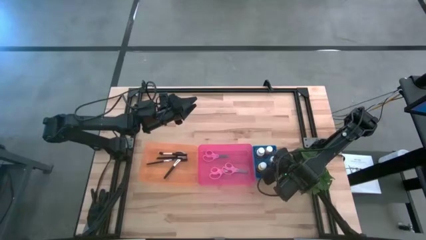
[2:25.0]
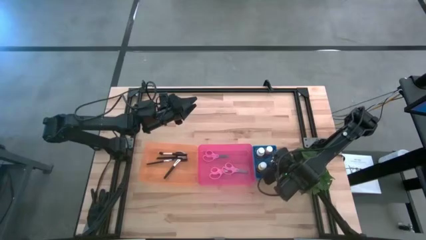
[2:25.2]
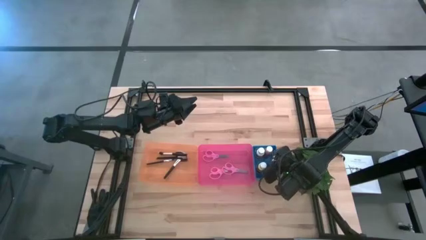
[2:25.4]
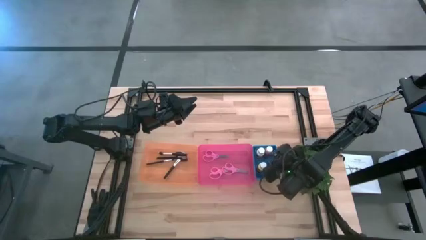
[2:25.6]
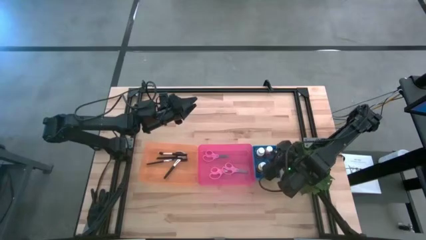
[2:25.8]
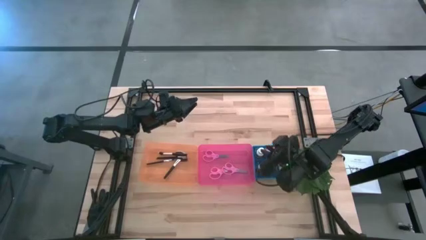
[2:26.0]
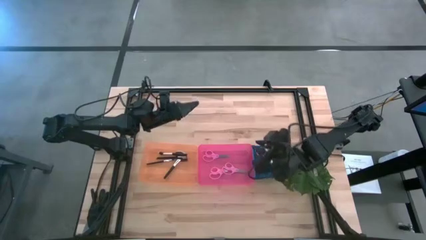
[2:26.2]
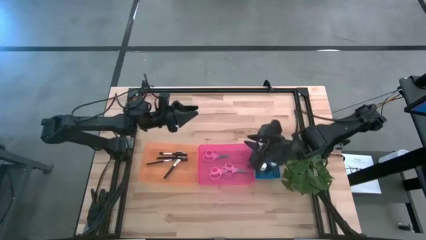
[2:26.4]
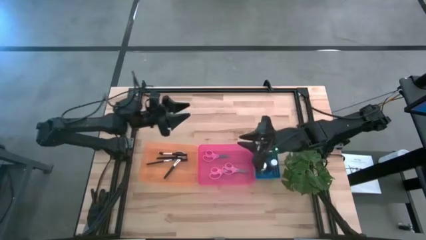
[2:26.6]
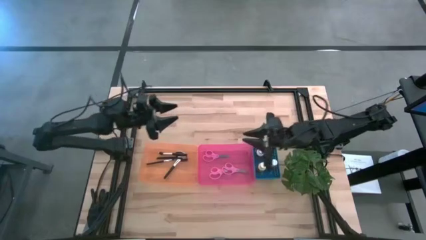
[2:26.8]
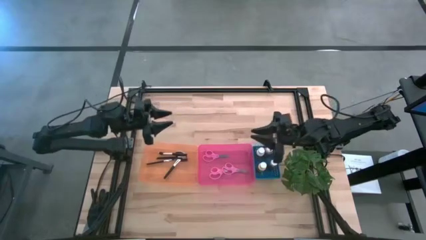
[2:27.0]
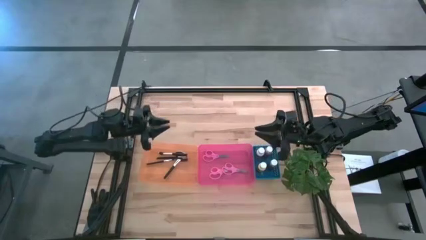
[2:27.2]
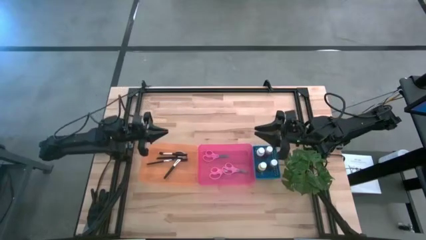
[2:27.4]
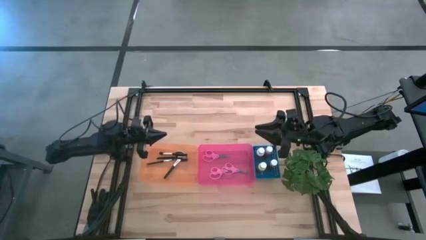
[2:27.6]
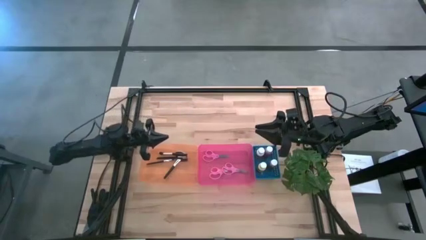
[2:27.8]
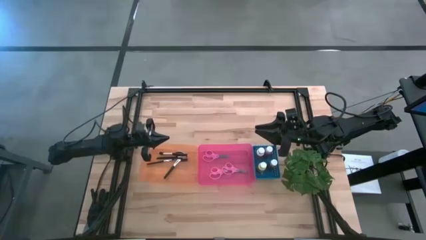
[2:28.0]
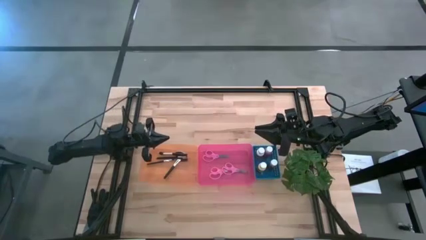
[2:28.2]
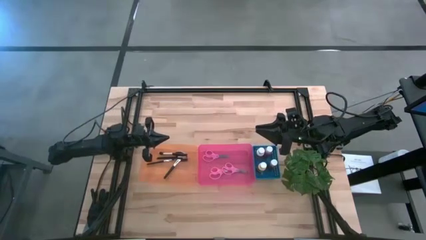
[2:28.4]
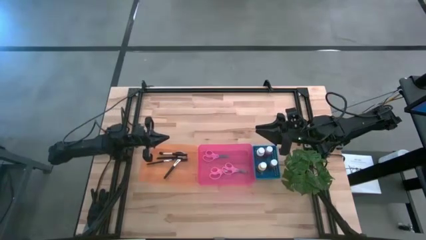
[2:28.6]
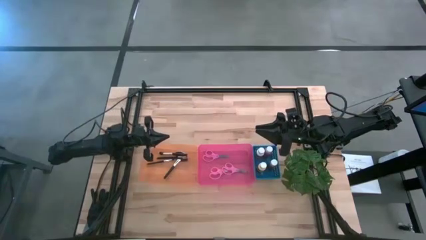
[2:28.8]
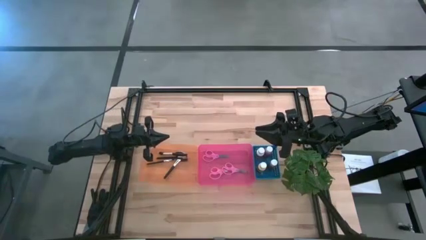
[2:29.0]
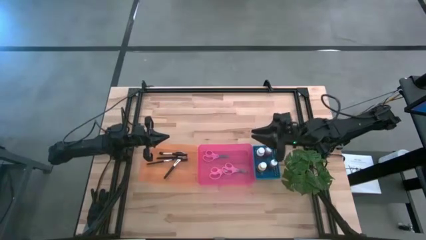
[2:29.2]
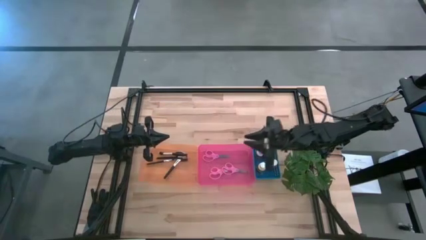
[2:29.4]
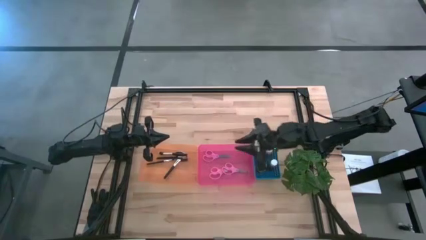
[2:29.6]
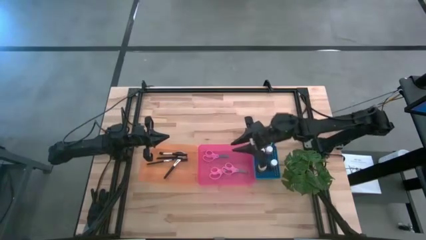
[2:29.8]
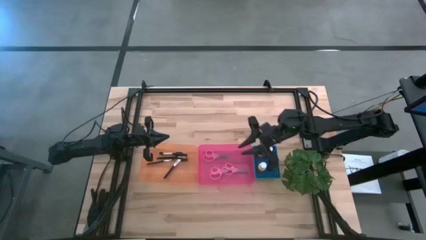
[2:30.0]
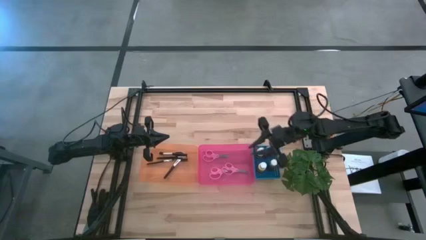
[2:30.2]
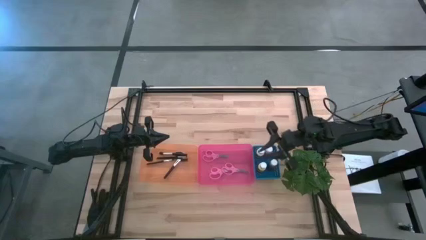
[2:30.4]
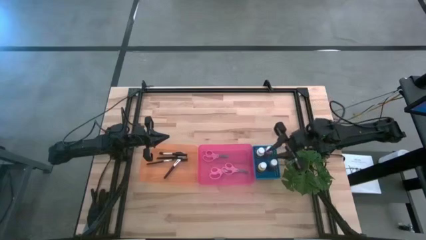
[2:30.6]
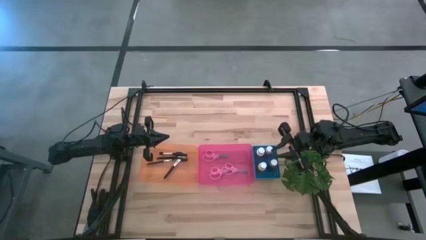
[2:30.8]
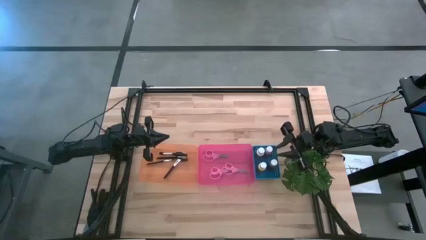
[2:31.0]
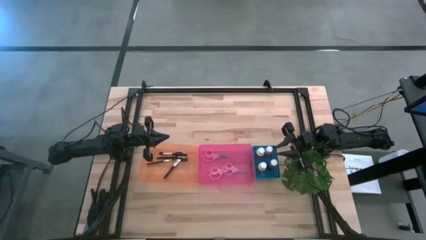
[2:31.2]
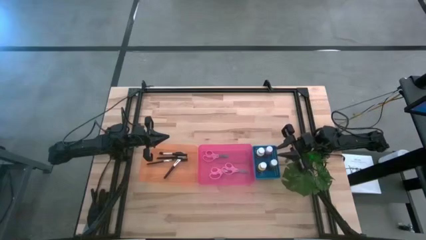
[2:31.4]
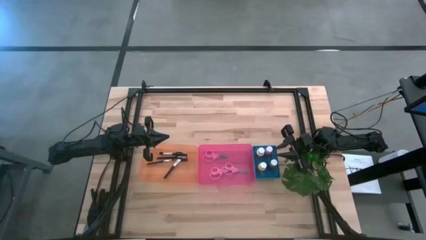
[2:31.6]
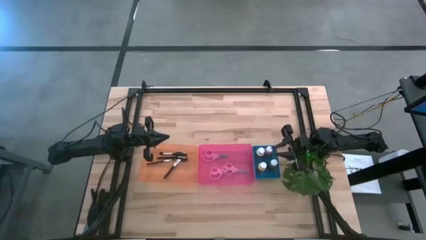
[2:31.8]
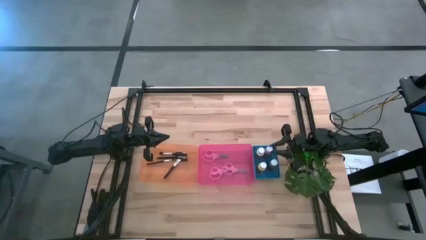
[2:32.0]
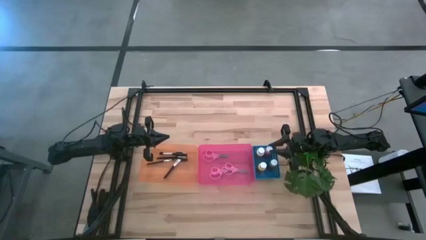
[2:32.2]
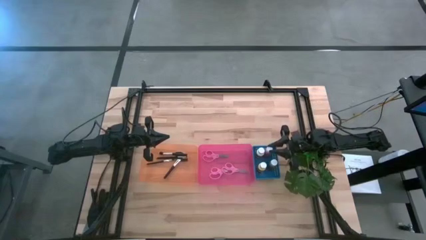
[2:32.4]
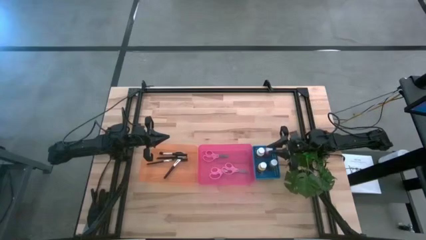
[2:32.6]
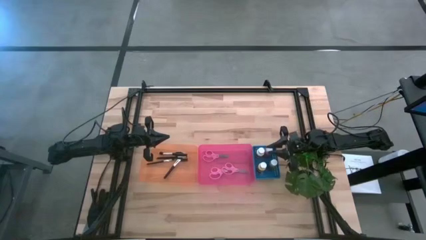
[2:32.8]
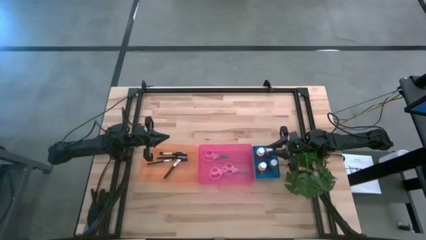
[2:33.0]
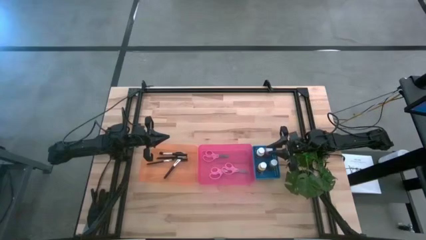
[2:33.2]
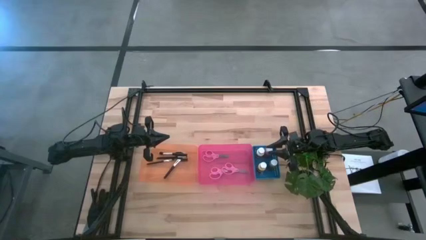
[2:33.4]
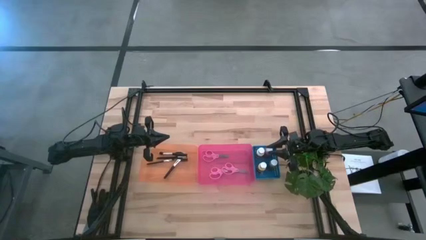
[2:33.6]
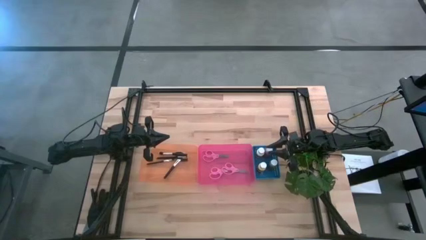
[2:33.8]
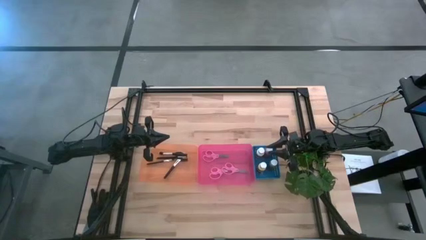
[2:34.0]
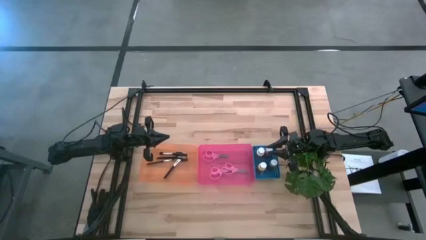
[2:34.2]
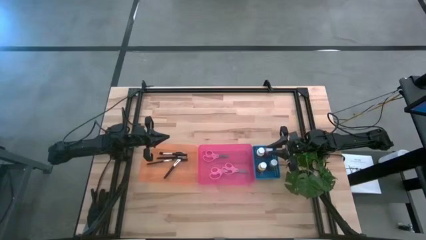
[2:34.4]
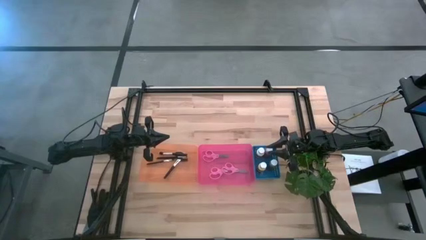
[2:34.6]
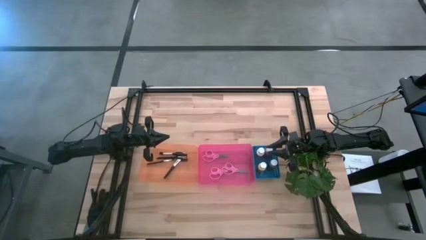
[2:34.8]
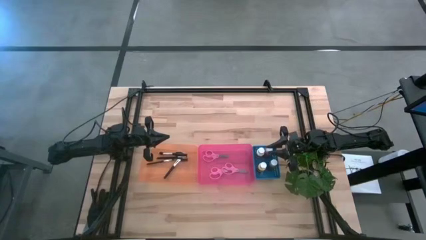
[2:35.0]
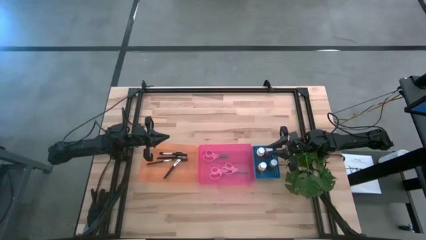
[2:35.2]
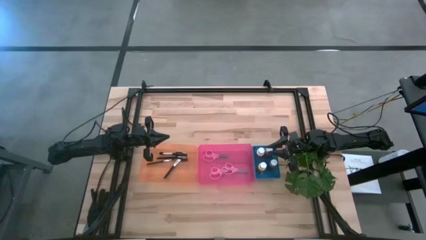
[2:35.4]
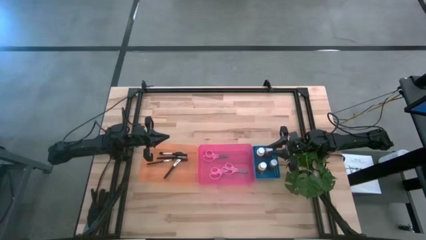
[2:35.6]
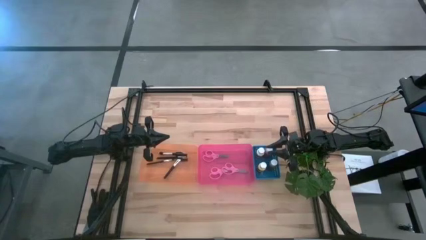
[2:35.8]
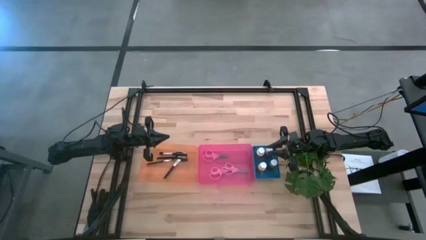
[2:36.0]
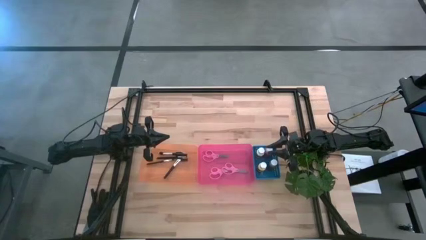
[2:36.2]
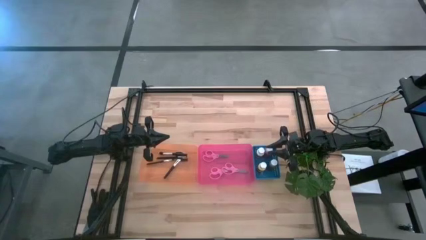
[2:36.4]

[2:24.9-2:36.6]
Task: Pick & Place Paint Supplies
Return to Home Position
